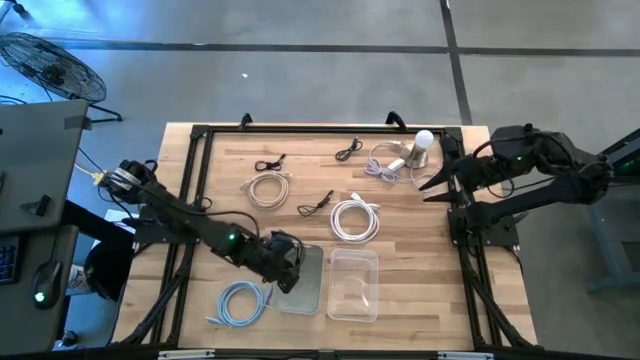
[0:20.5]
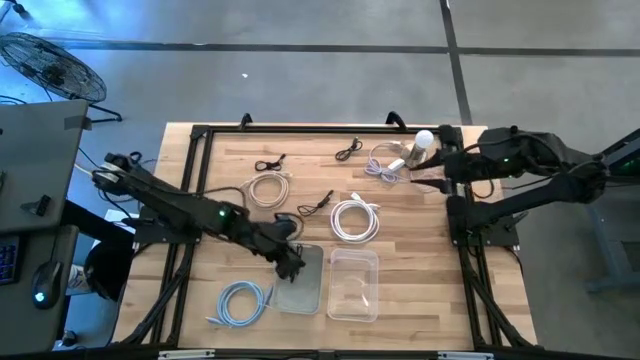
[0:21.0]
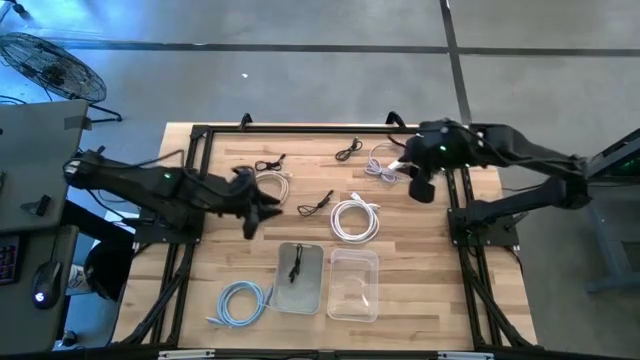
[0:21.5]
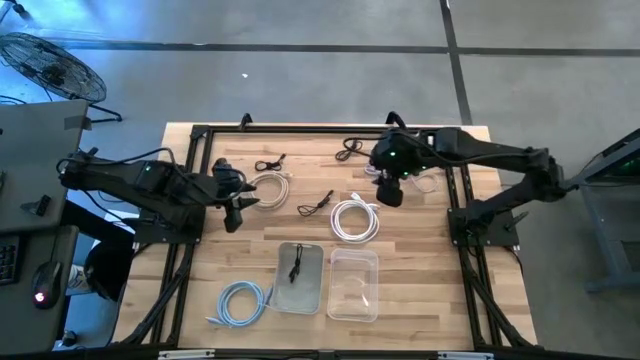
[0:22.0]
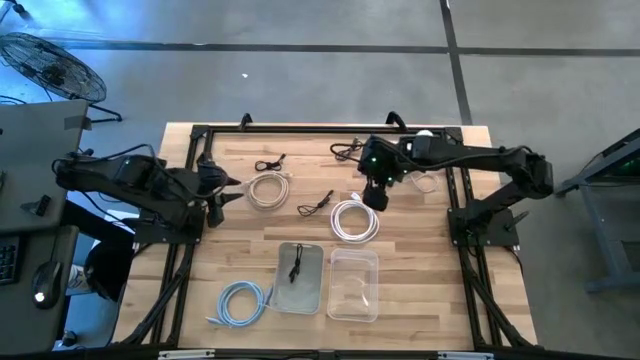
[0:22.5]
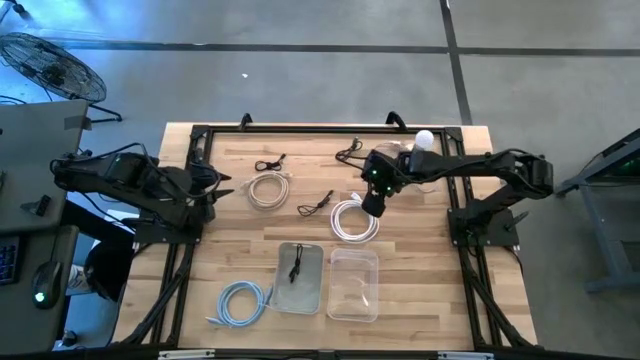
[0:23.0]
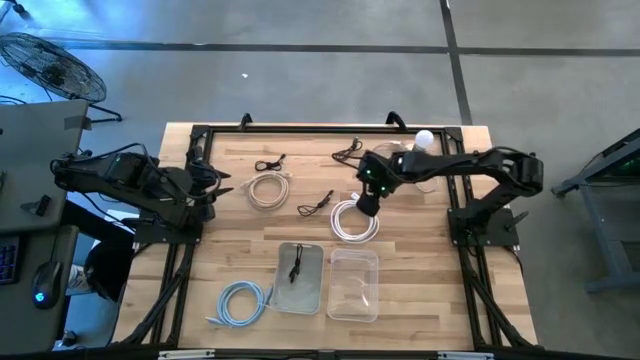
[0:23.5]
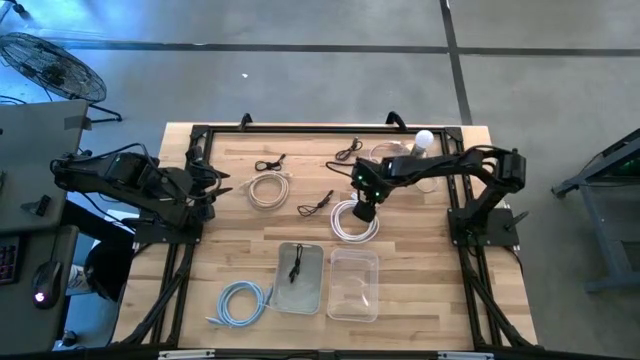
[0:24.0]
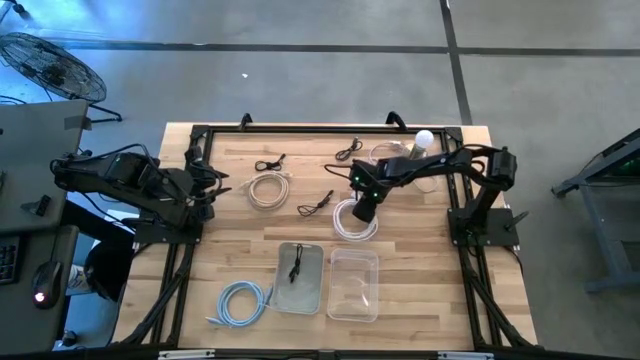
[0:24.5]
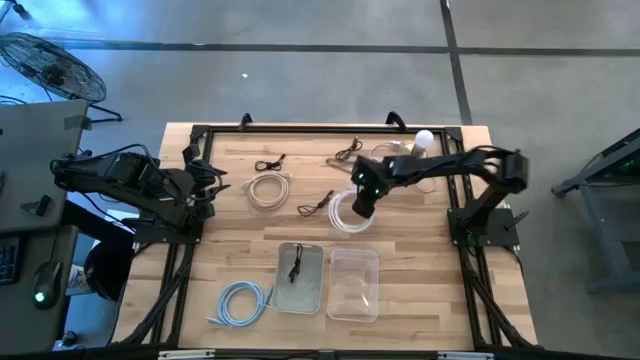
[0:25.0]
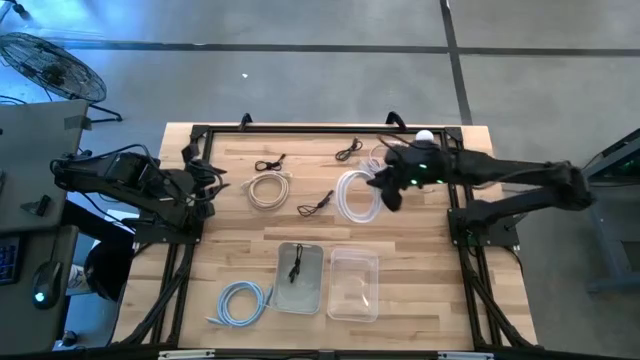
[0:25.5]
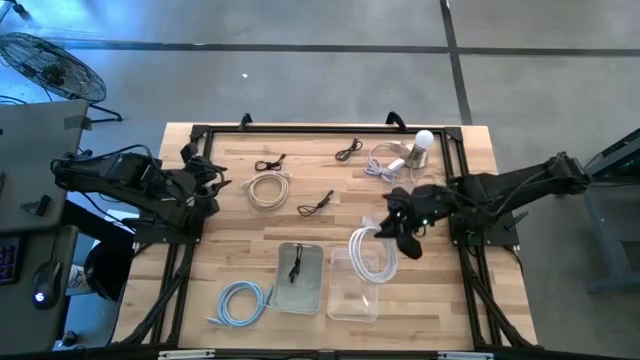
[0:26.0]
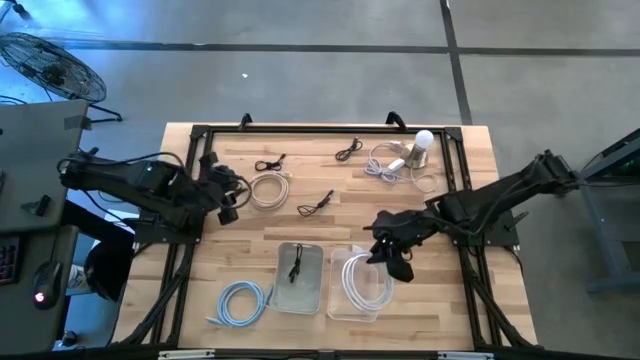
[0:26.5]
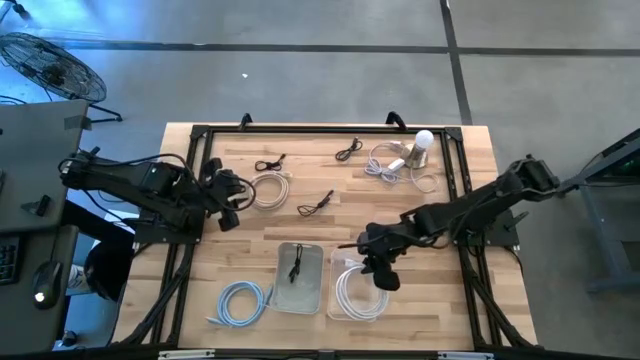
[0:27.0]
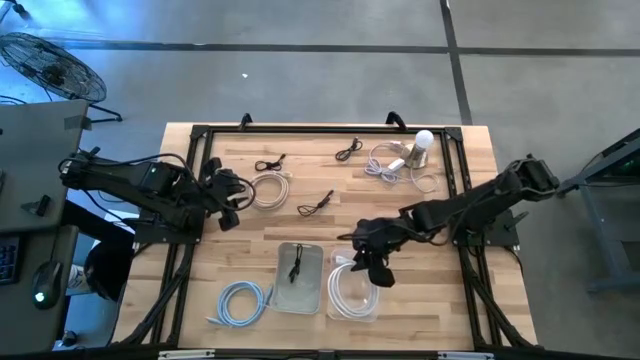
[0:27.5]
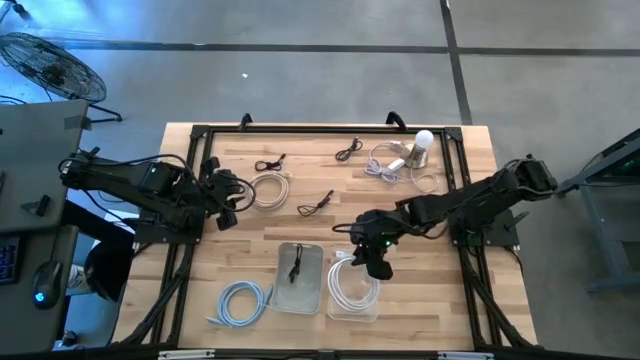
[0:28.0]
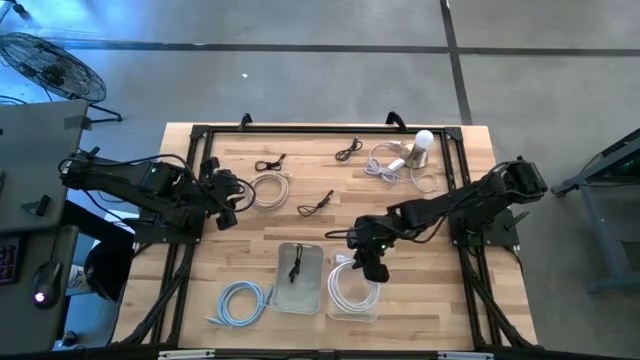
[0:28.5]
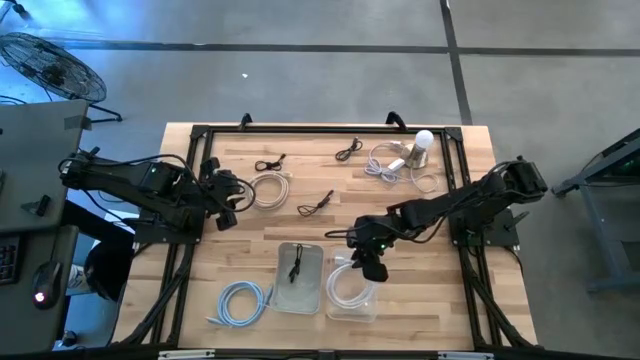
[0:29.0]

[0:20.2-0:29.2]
Task: Pick & Place USB Port
Put the white HDMI cable into the transparent bin

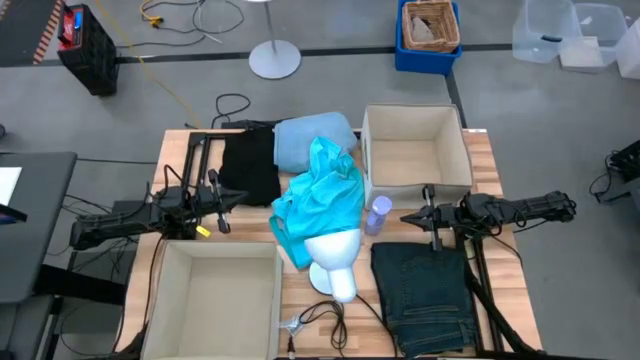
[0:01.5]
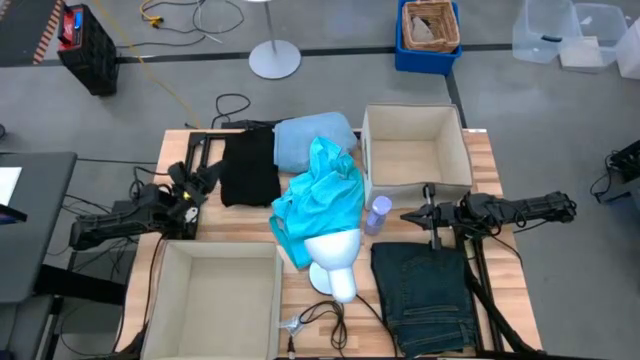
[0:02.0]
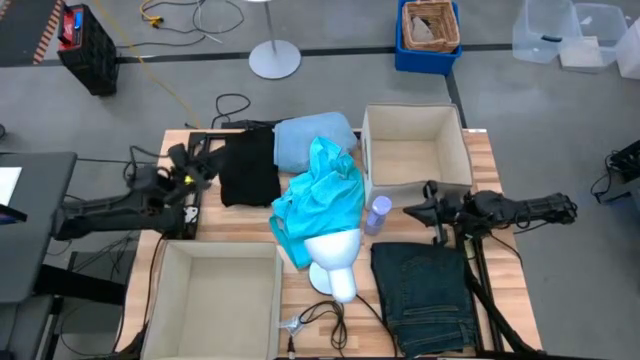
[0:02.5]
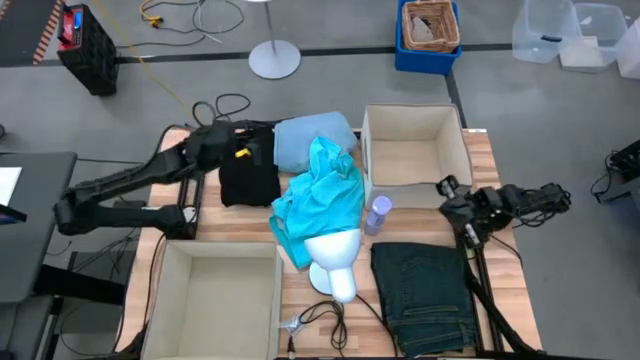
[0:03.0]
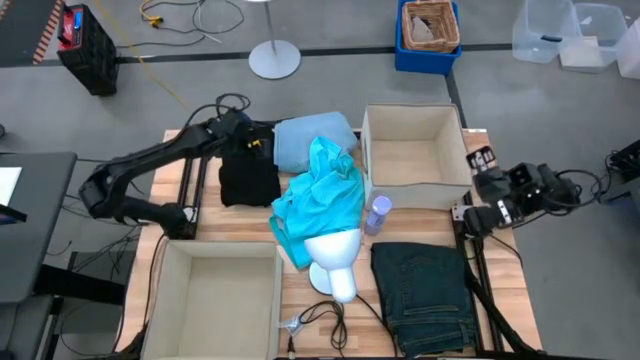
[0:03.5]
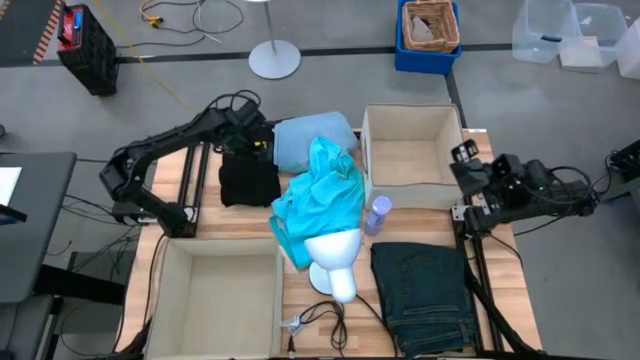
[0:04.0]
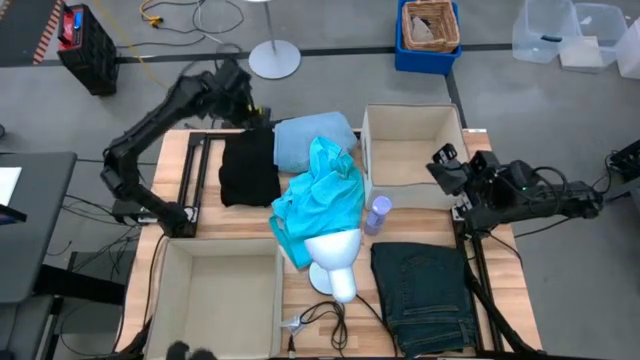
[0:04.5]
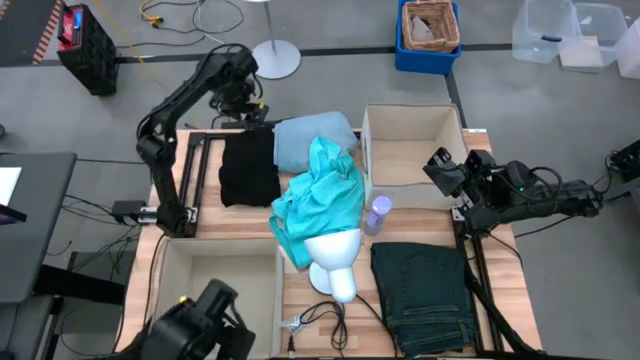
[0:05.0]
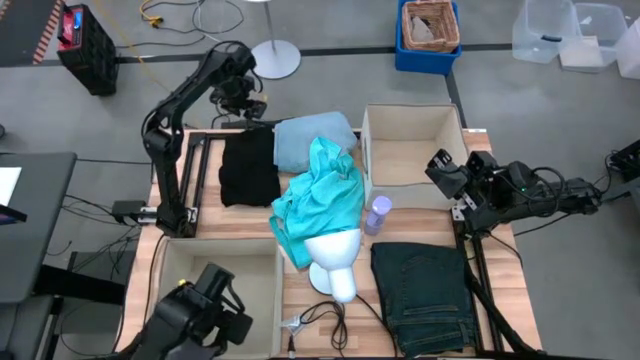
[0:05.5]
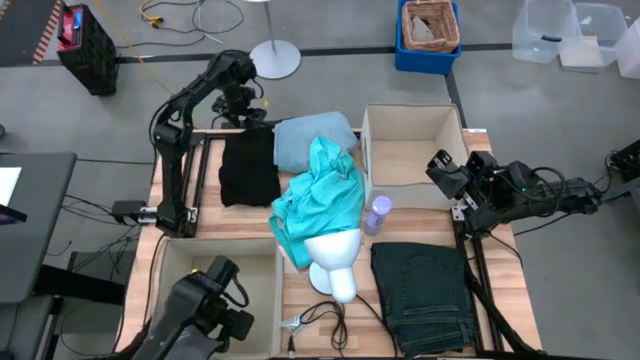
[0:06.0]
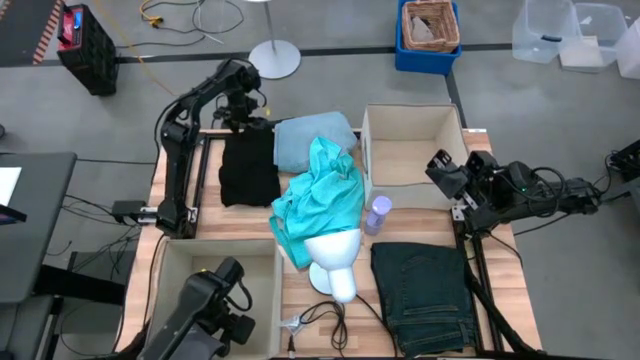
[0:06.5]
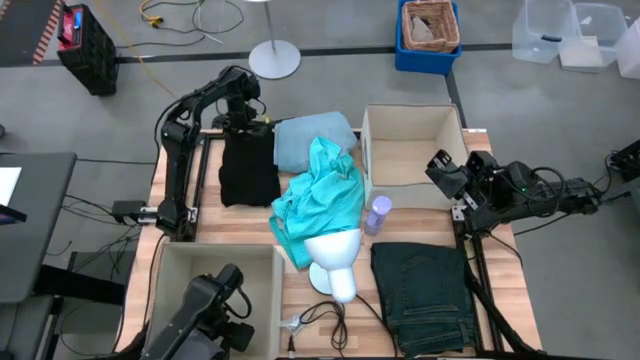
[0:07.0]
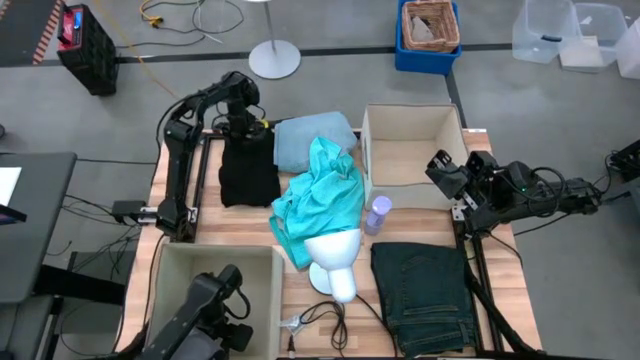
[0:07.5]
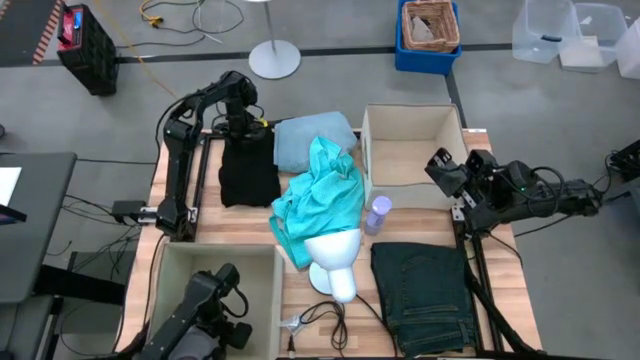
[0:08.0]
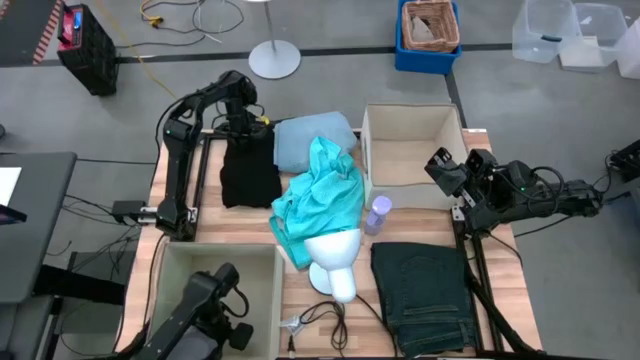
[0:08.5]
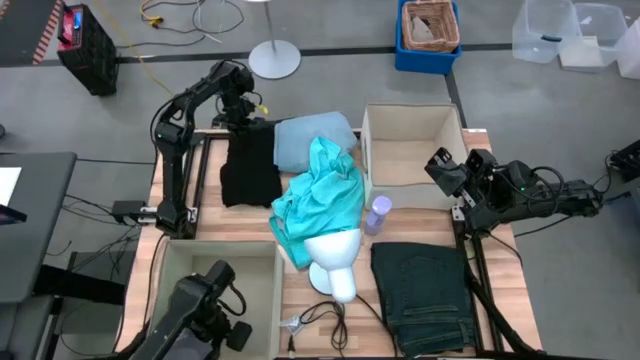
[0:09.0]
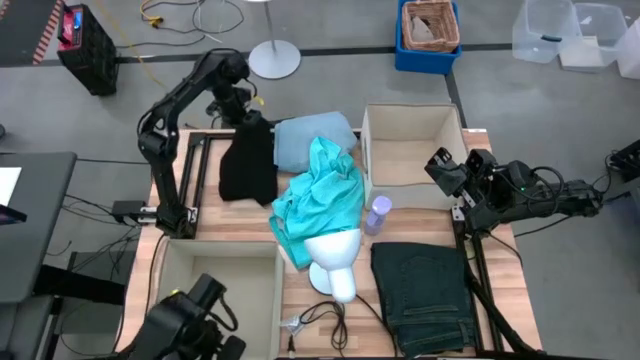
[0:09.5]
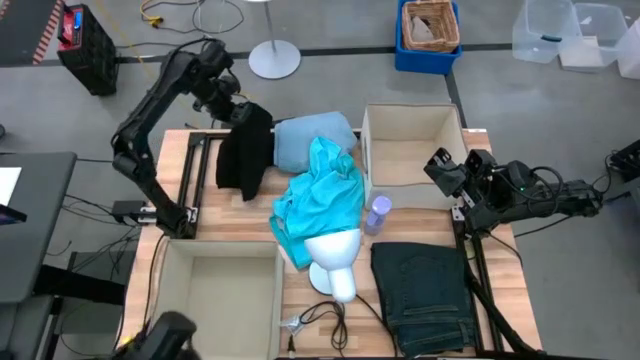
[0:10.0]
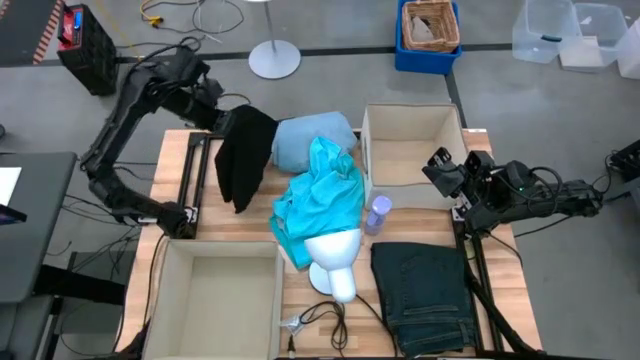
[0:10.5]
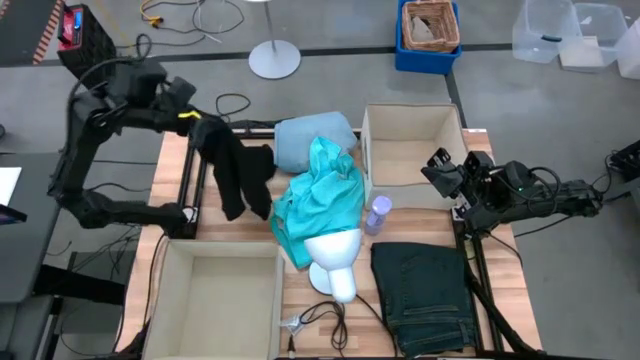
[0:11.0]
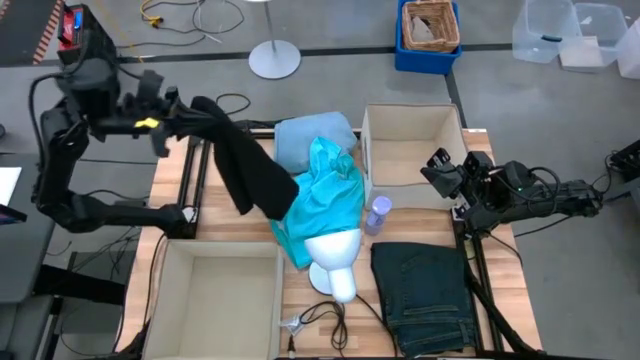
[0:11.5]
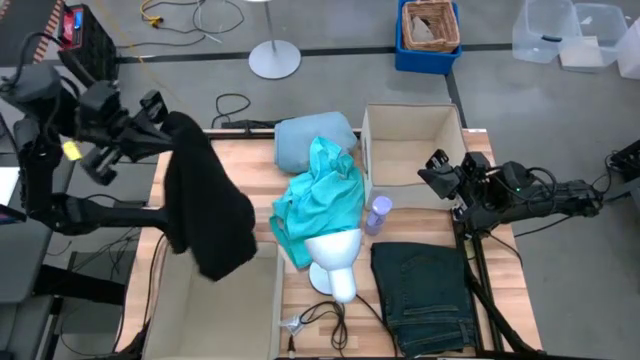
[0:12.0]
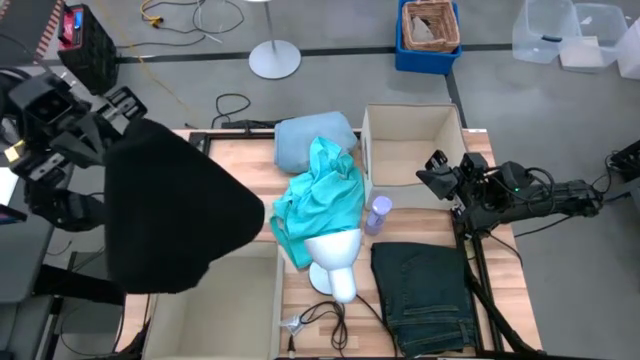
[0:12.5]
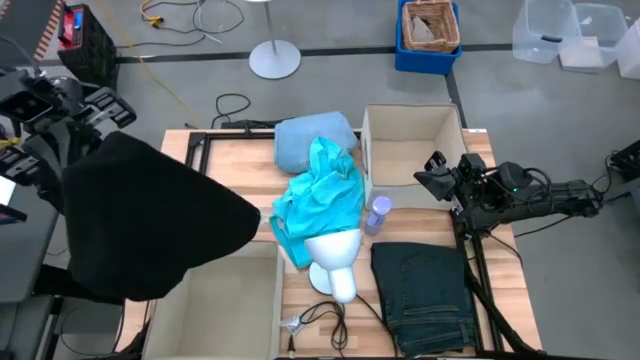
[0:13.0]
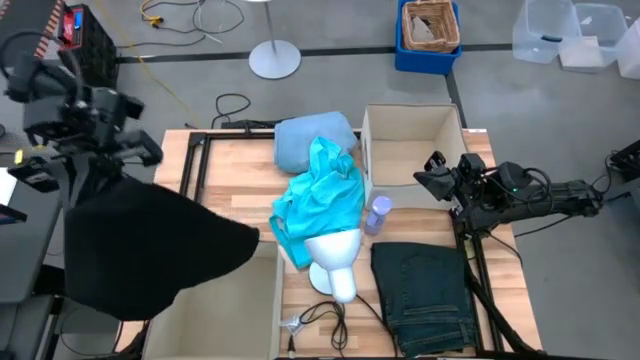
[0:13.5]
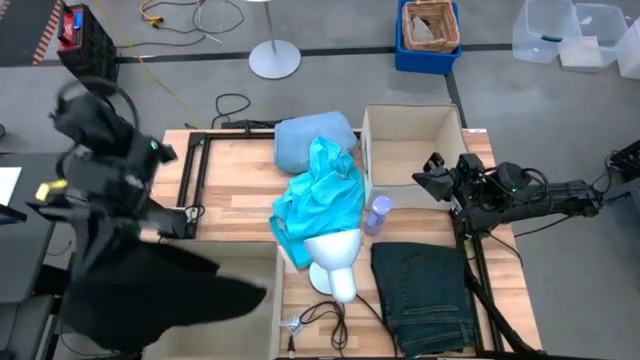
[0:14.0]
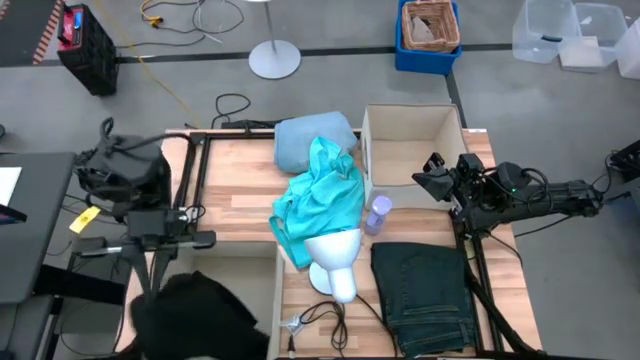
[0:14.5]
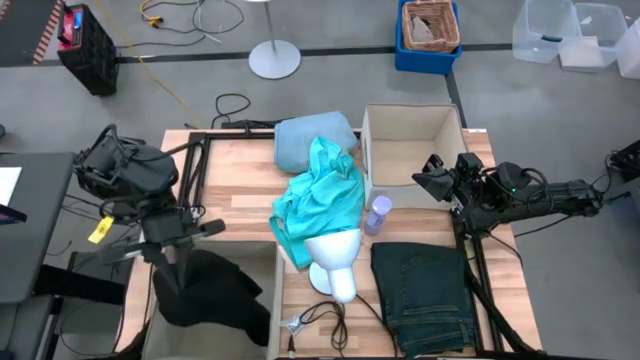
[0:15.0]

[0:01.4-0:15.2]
Task: Sort clothes
Put the black jeans into the bottom laundry organizer
